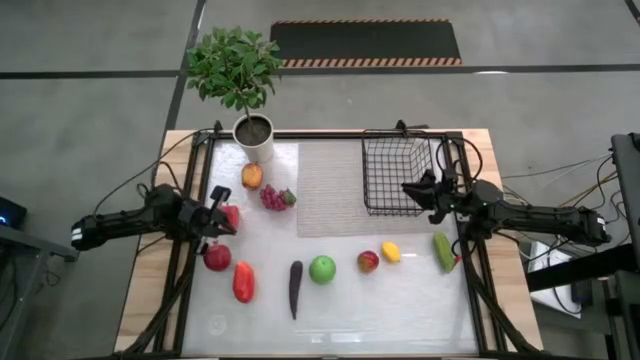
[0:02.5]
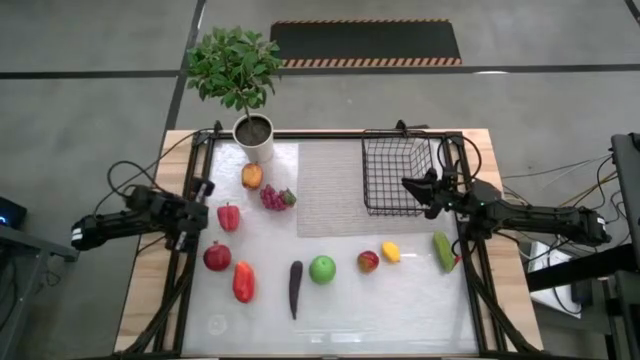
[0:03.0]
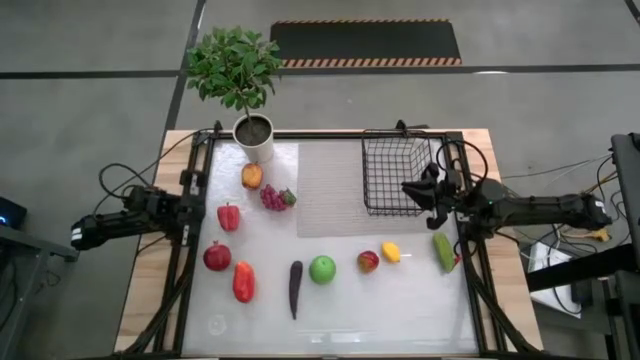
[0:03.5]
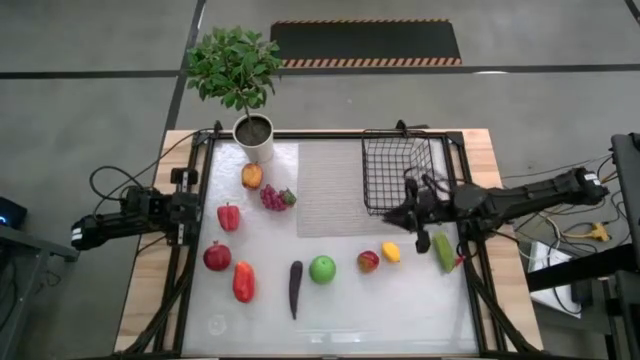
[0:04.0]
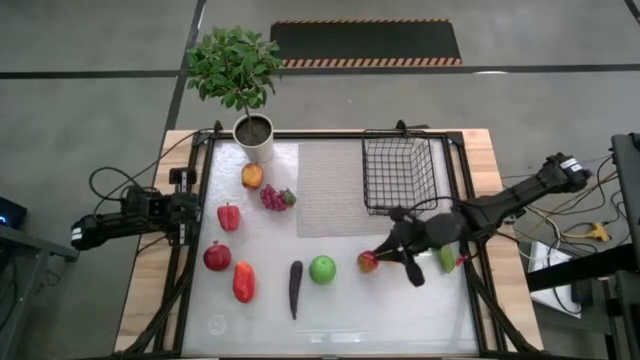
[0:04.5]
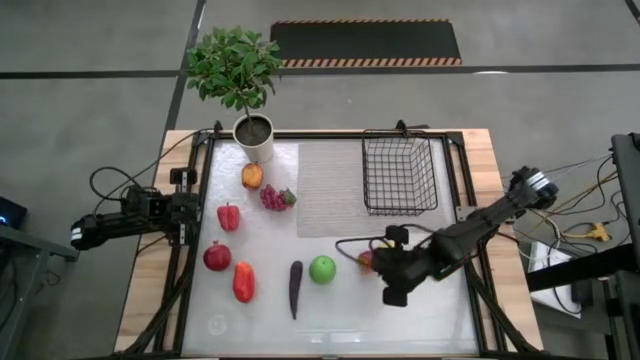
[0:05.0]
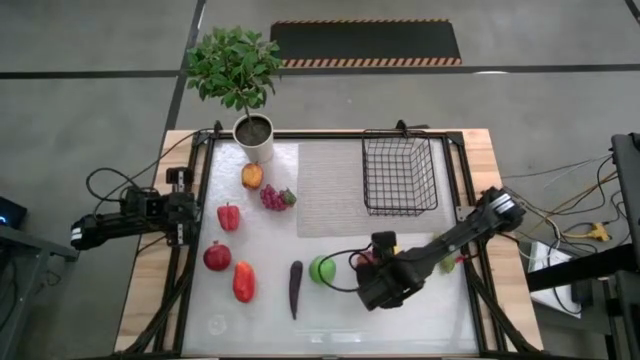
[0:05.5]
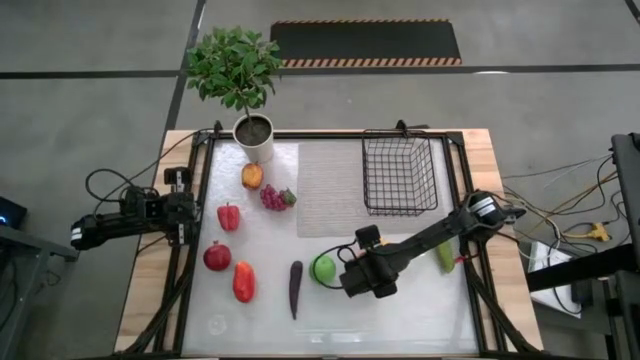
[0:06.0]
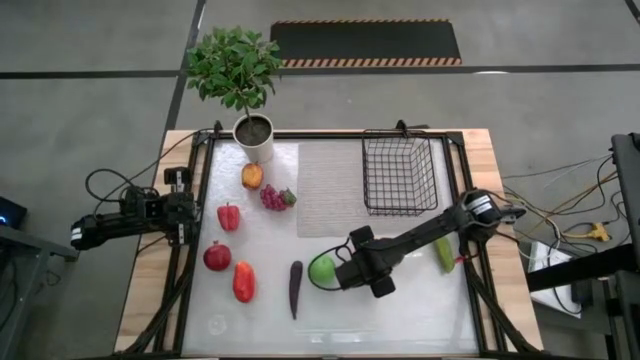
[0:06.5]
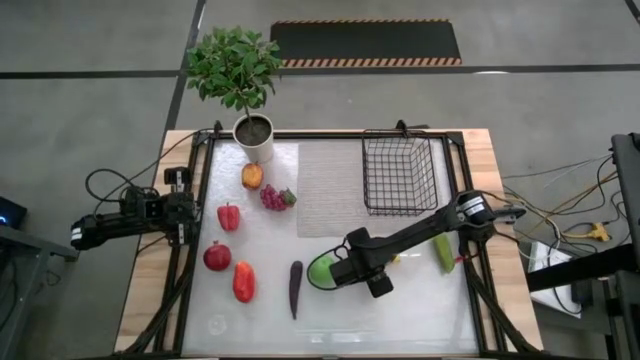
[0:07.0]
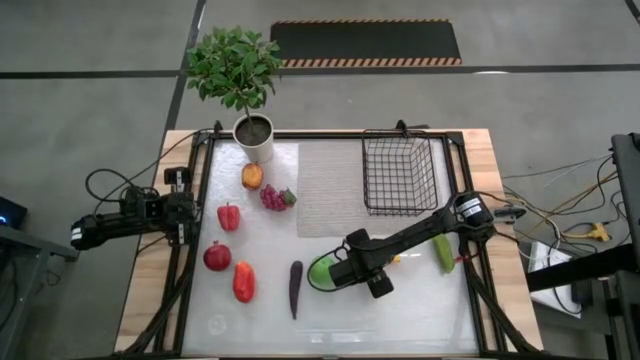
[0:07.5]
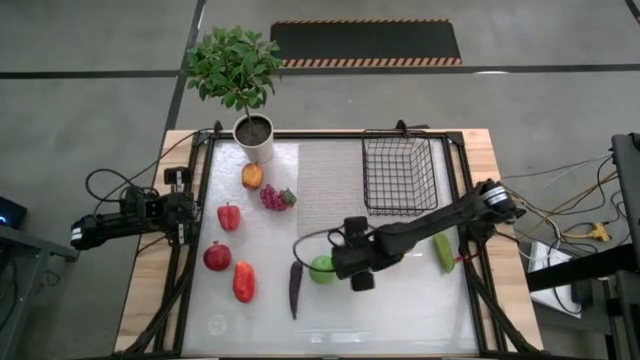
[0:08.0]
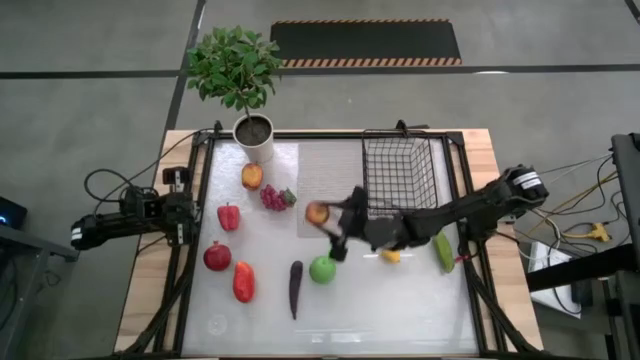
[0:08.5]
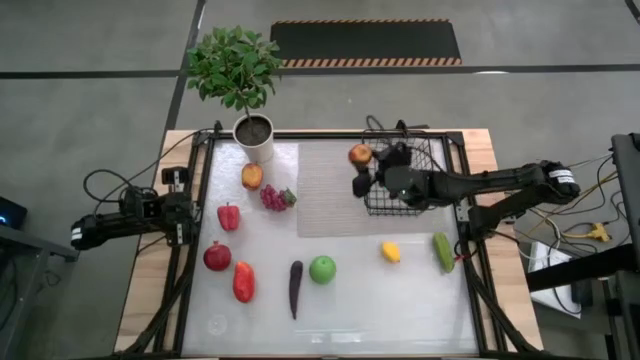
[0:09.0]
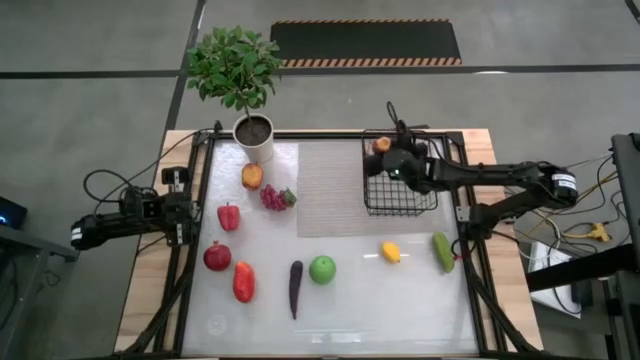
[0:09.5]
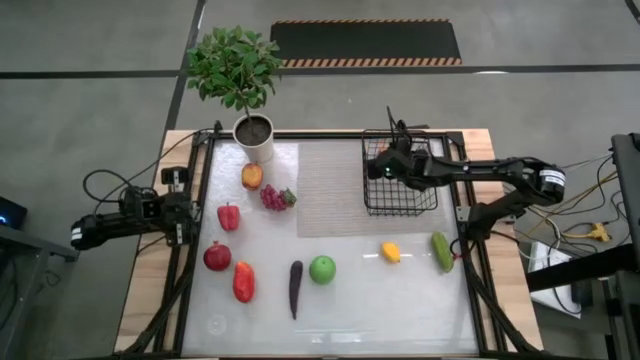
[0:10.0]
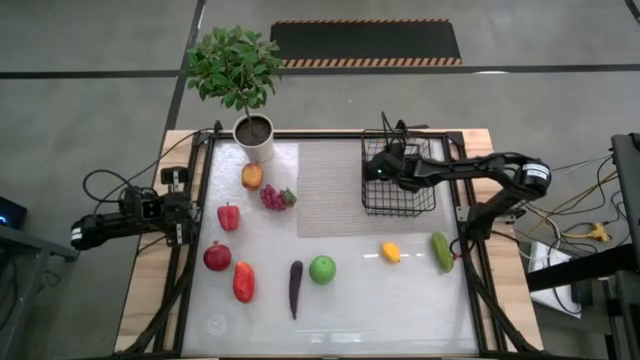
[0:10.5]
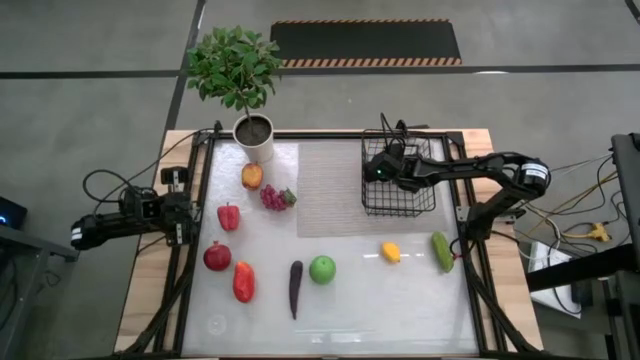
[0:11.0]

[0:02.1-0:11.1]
Task: Build produce basket
Put the right red apple into the wire basket

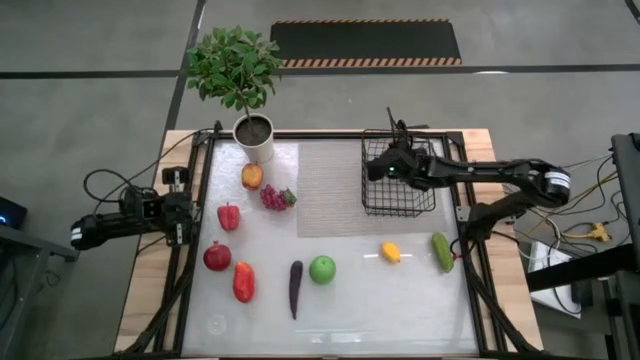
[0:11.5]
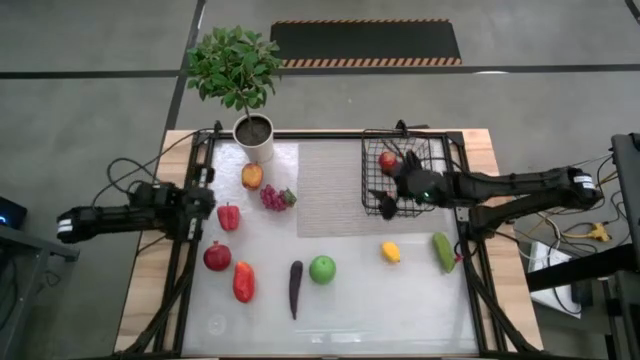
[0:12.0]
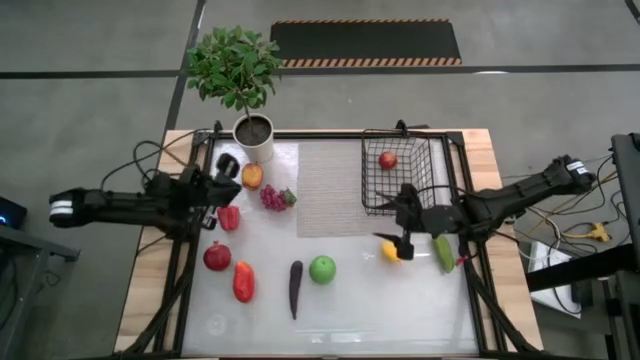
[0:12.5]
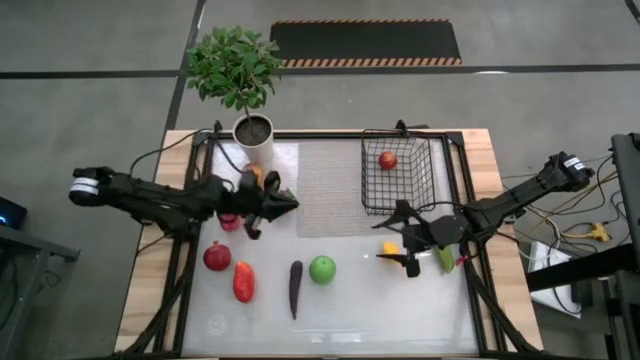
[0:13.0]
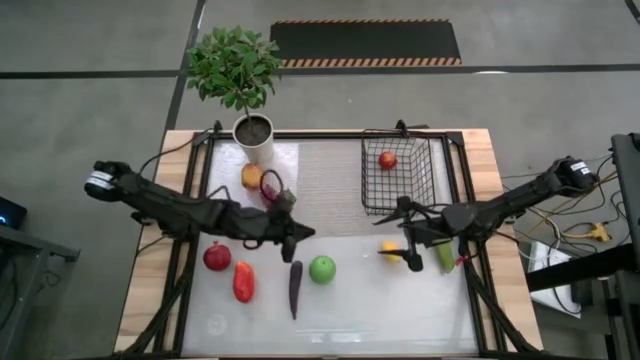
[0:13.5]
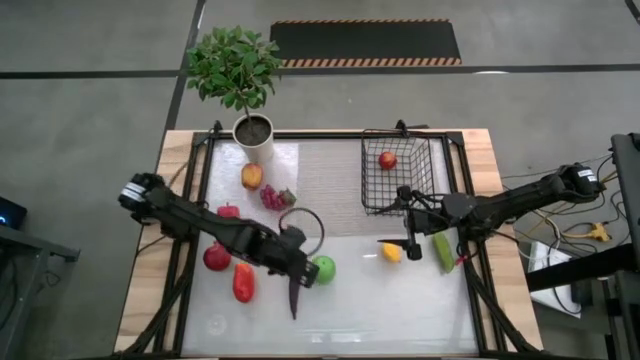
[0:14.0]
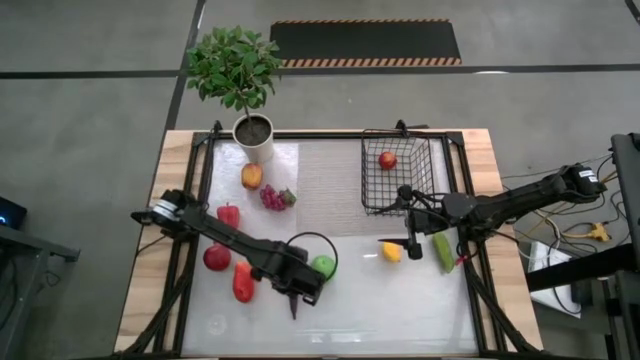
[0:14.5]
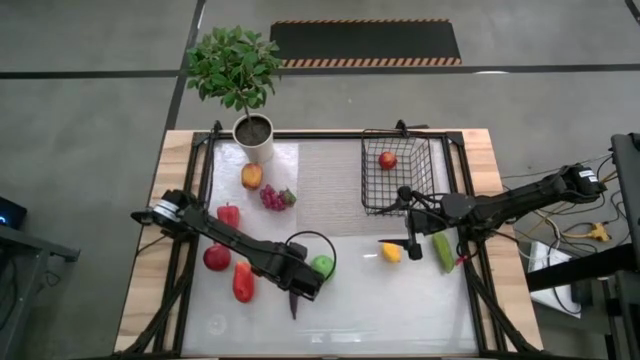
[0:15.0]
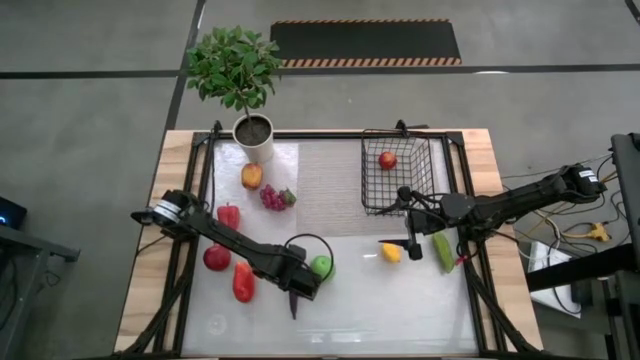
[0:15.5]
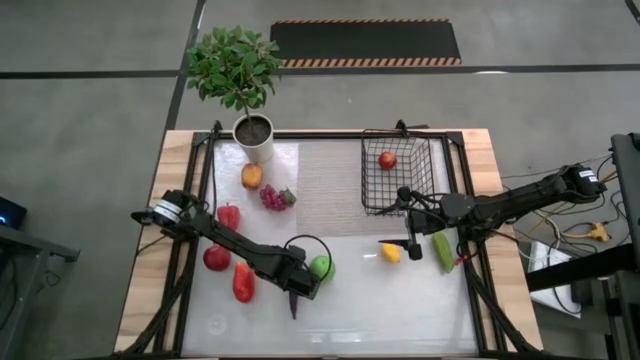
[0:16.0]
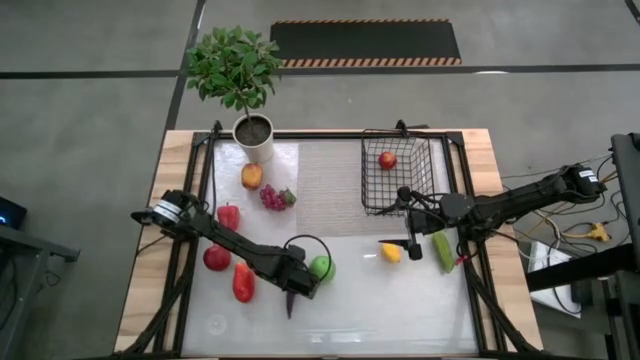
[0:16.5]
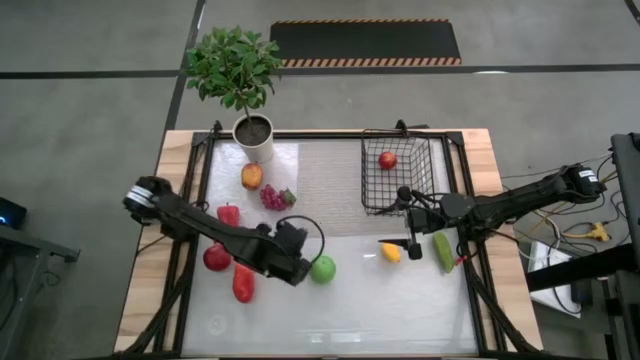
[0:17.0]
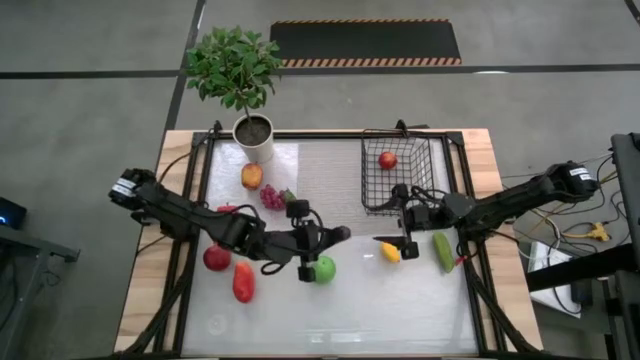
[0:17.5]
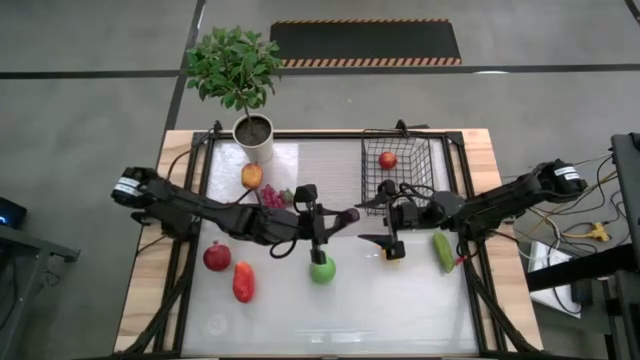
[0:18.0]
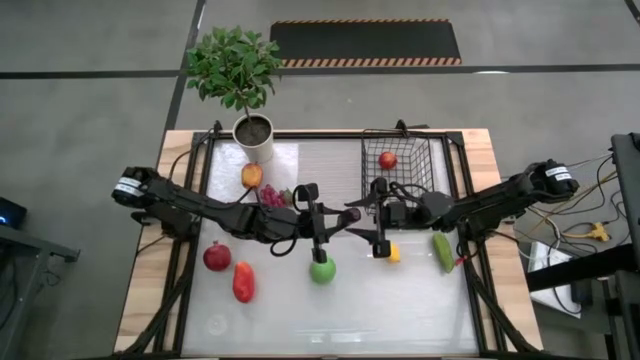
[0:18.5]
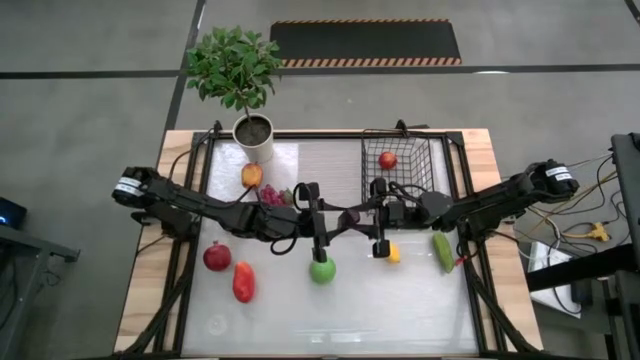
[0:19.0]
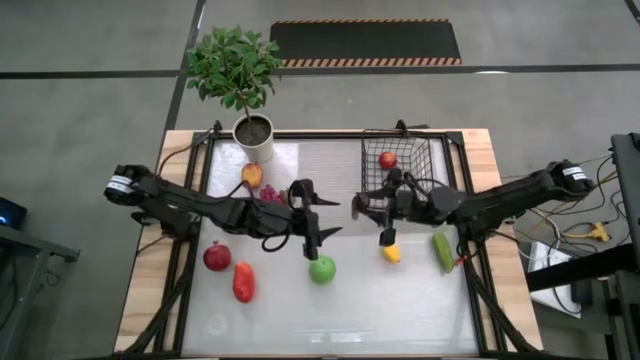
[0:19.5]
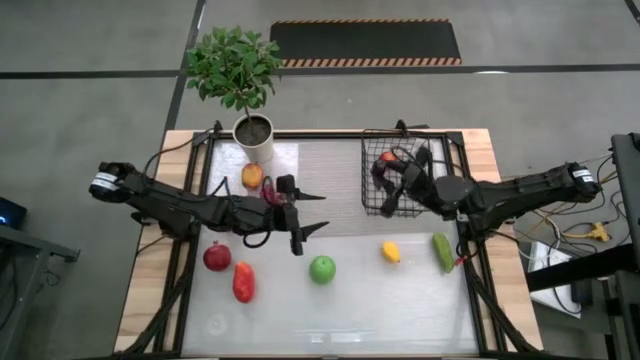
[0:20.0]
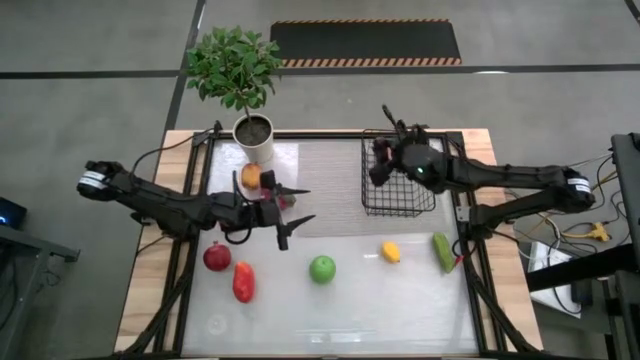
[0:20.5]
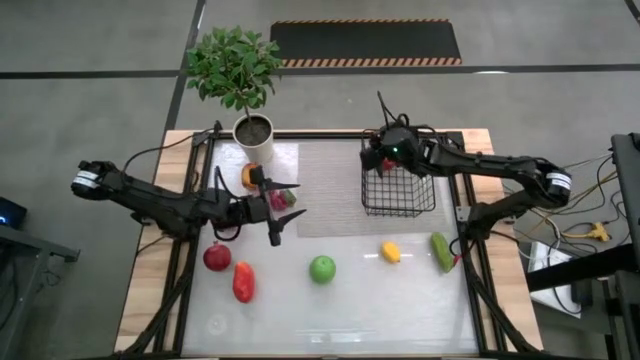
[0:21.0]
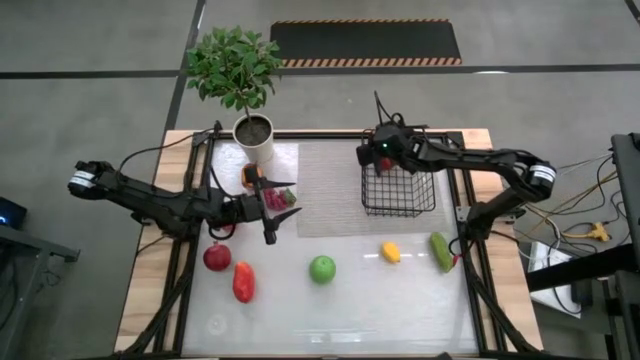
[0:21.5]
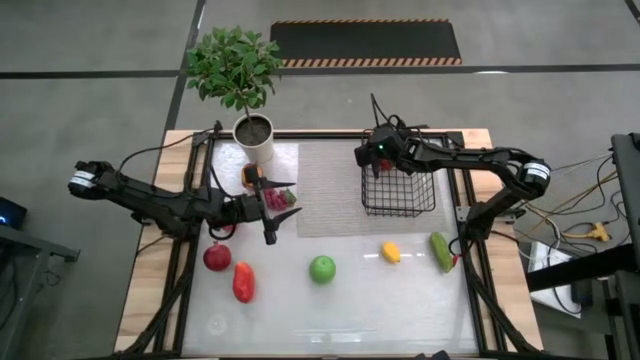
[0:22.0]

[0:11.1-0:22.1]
Put the violet eggplant into the wire basket
